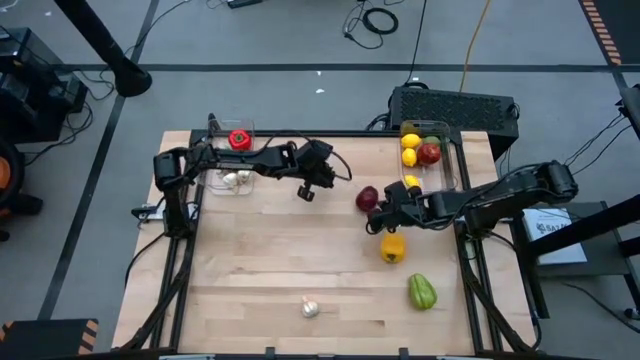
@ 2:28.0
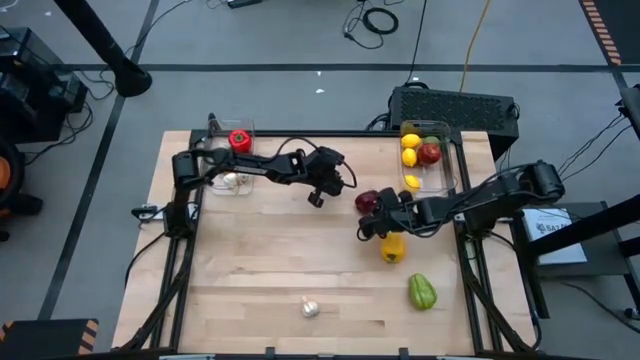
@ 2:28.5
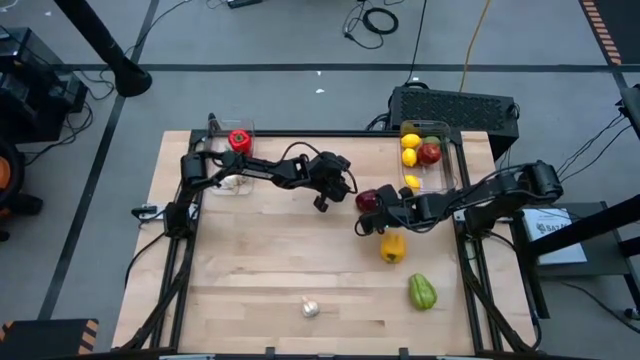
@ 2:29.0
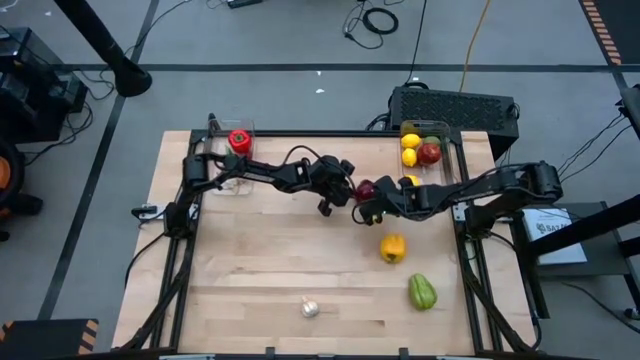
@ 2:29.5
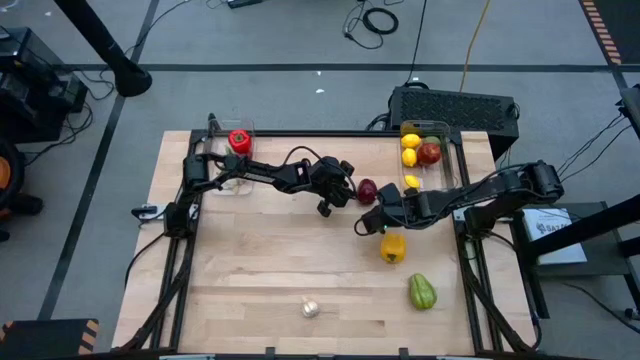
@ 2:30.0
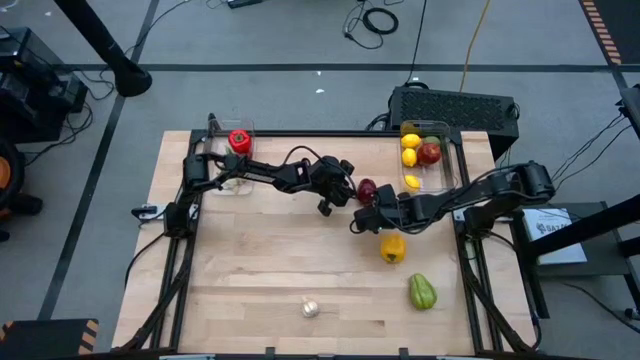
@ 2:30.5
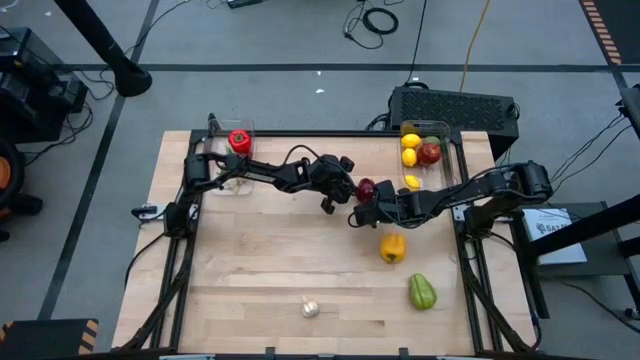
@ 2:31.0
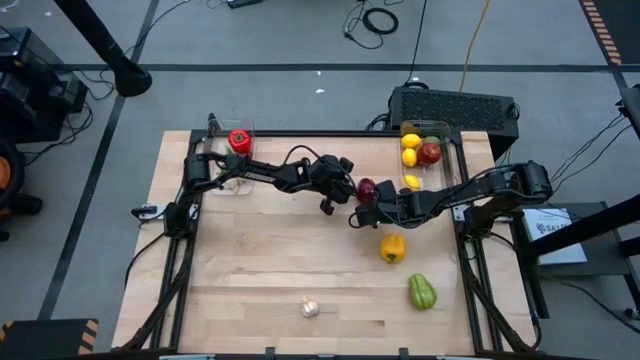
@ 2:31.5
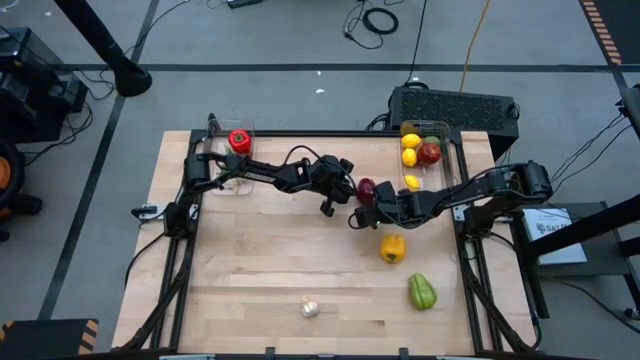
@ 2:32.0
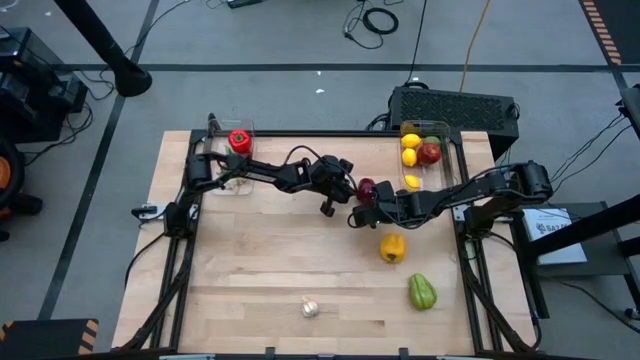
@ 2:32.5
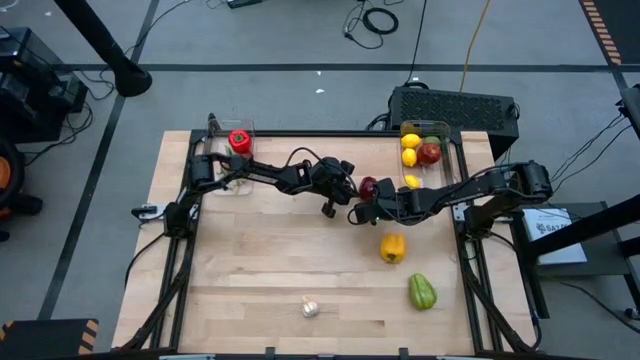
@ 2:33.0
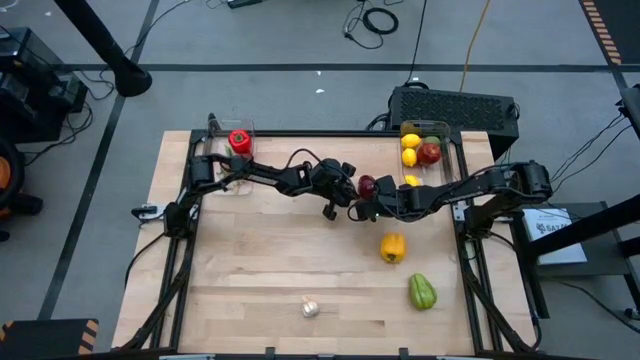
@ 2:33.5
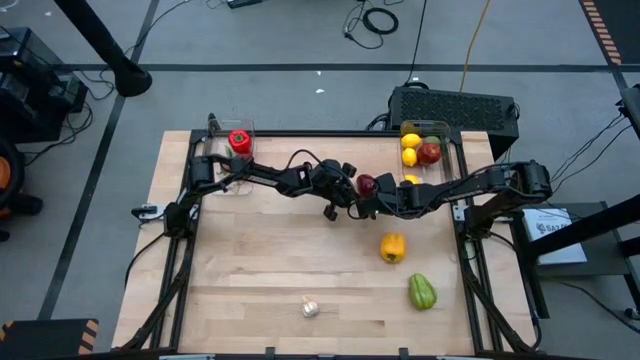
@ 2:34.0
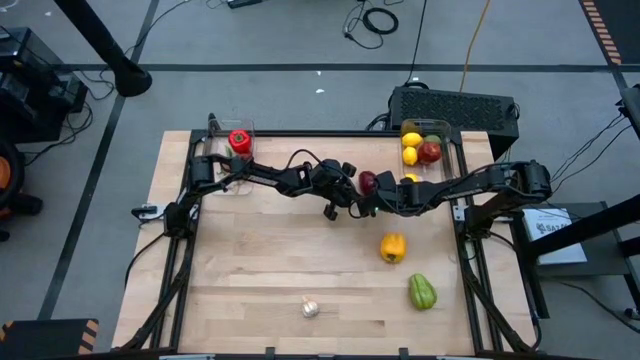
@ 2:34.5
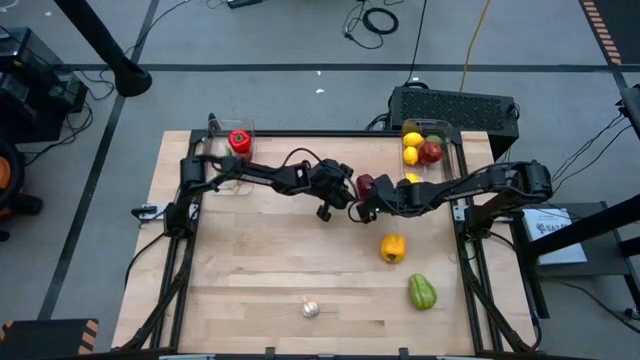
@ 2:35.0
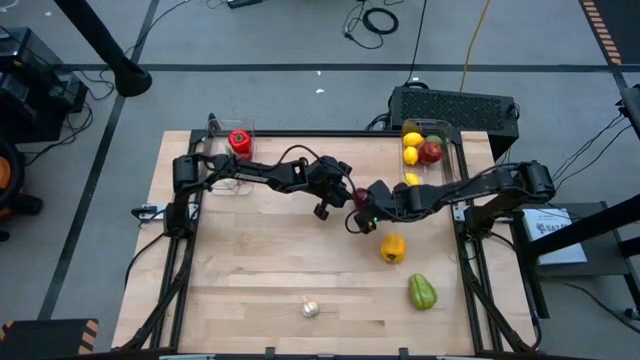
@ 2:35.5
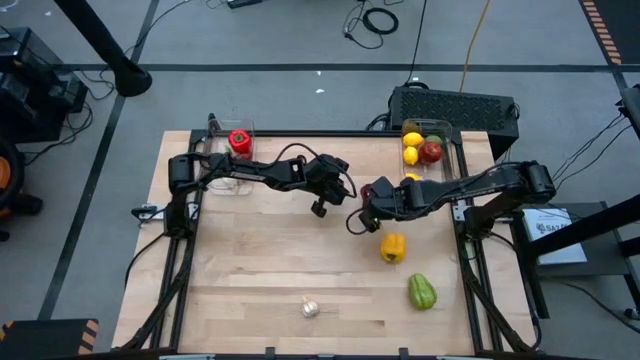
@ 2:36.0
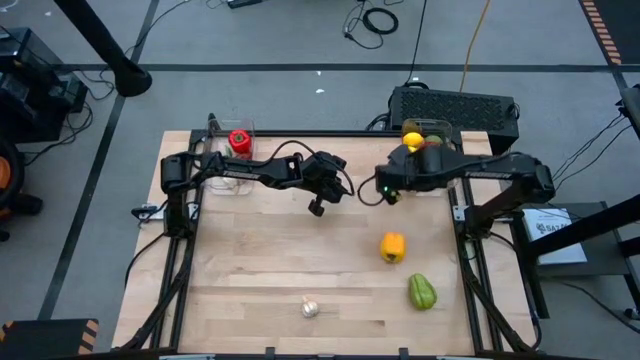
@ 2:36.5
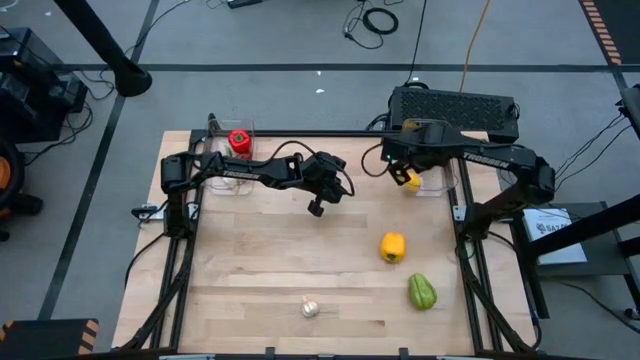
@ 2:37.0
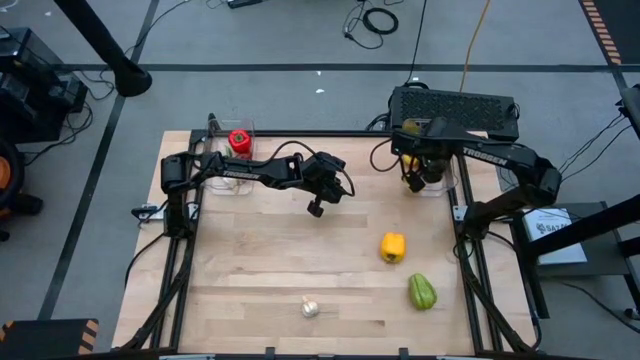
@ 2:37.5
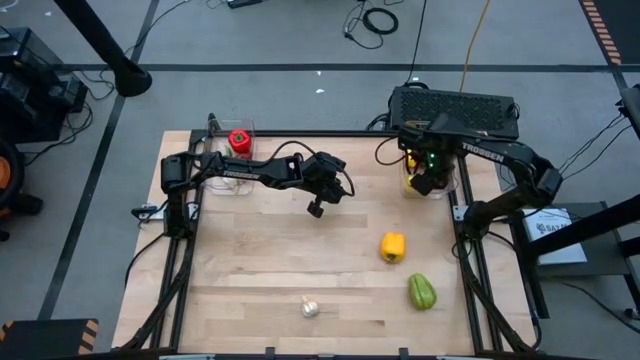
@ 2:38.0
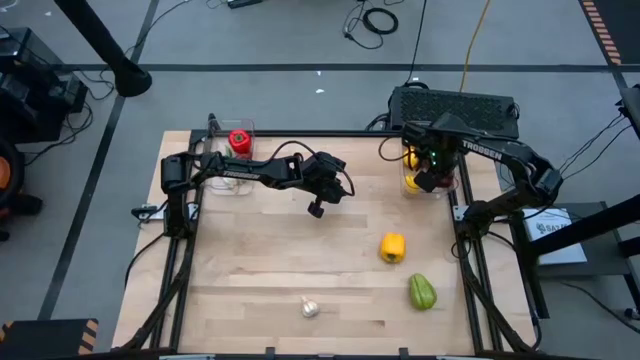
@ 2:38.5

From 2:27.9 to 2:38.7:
Task: Sort produce into baskets
Put the apple into the right transparent bin

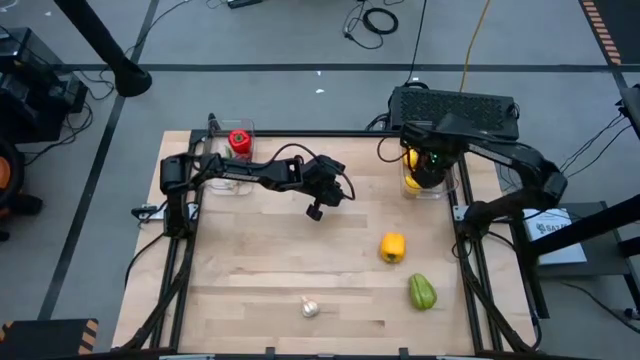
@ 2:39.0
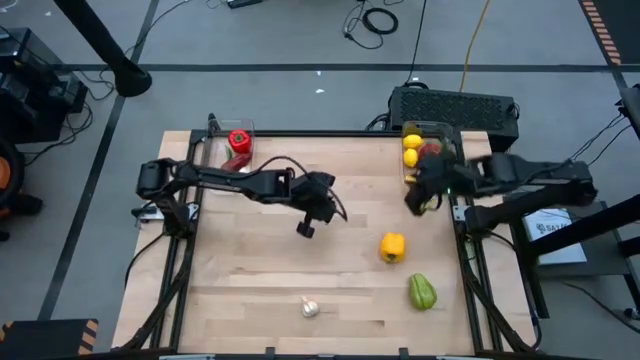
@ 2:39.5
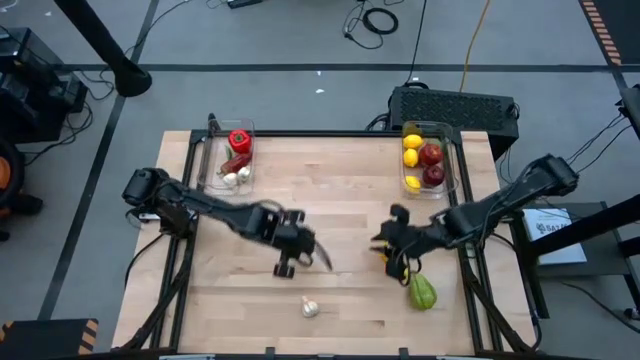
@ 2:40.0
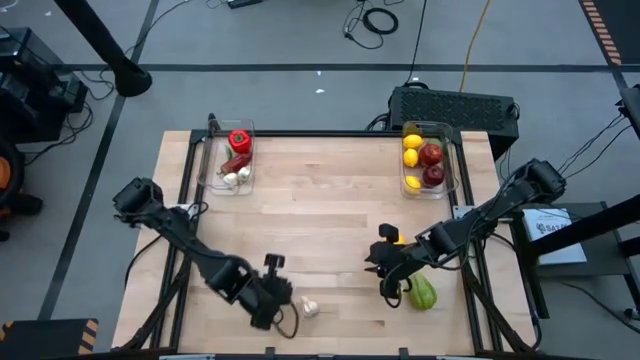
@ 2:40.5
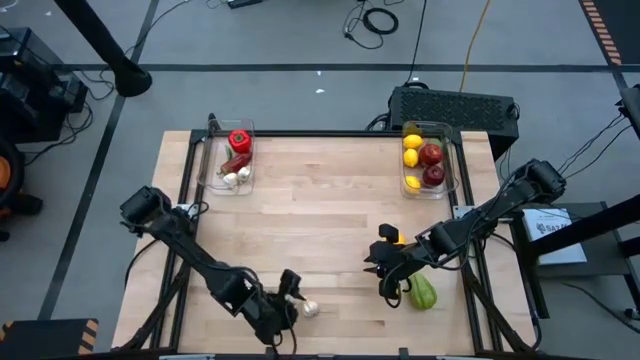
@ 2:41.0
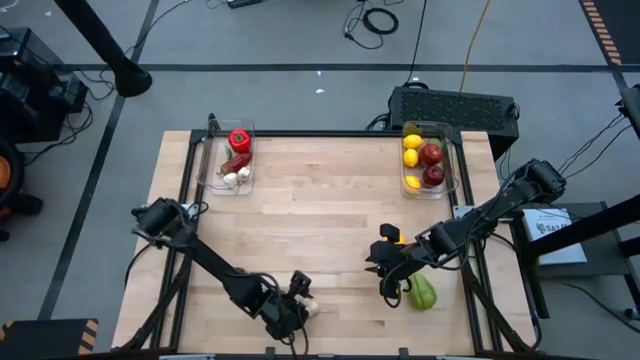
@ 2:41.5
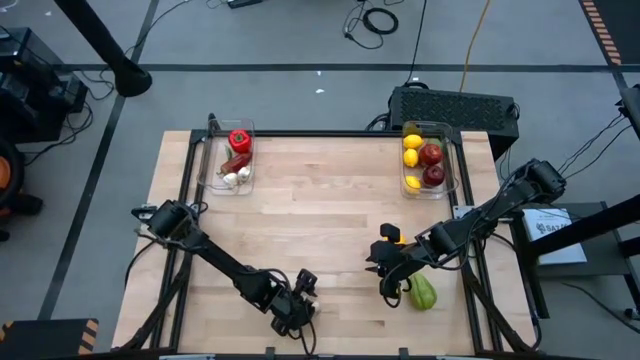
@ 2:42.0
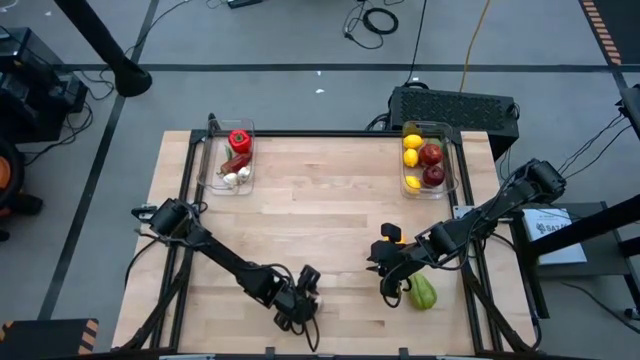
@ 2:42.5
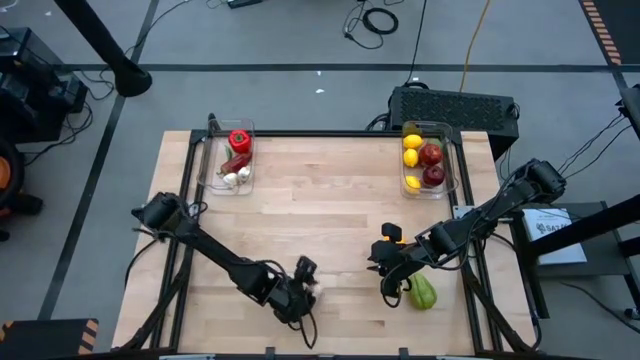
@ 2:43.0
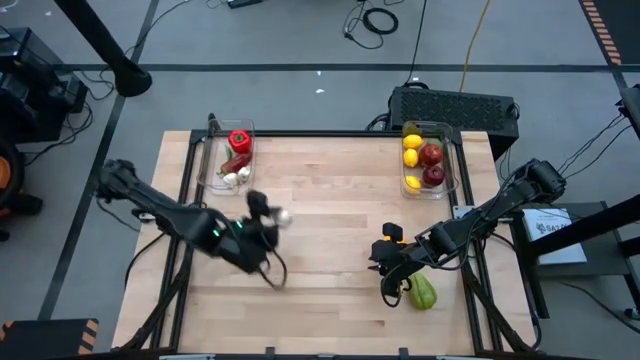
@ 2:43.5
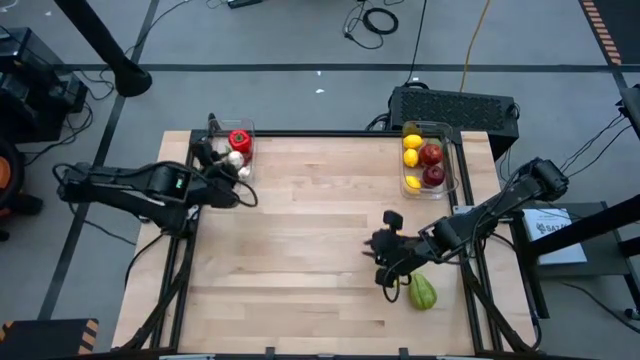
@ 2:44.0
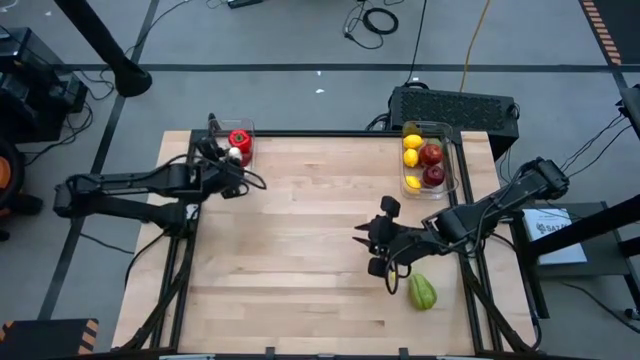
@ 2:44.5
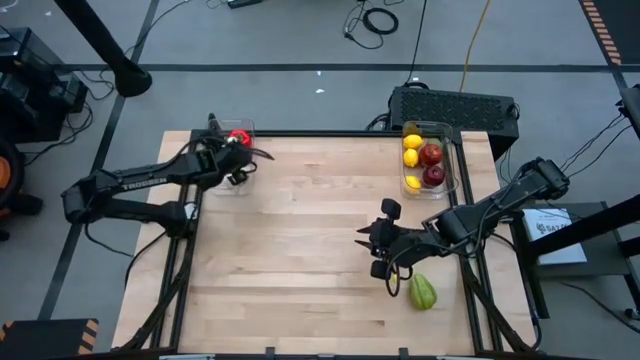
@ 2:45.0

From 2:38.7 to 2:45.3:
Put the white garlic into the left transparent bin

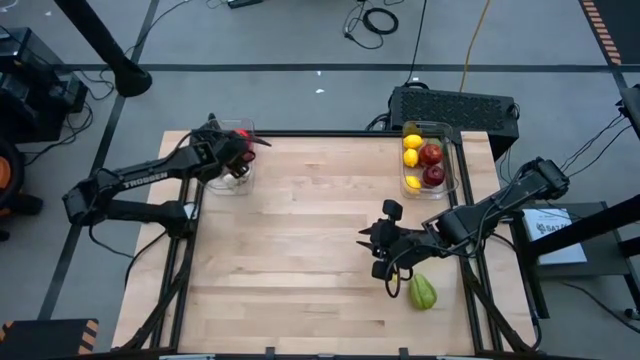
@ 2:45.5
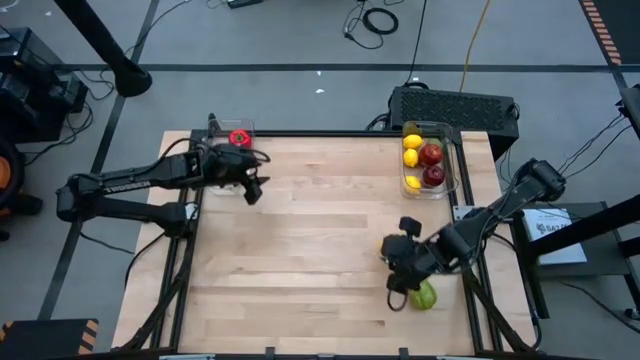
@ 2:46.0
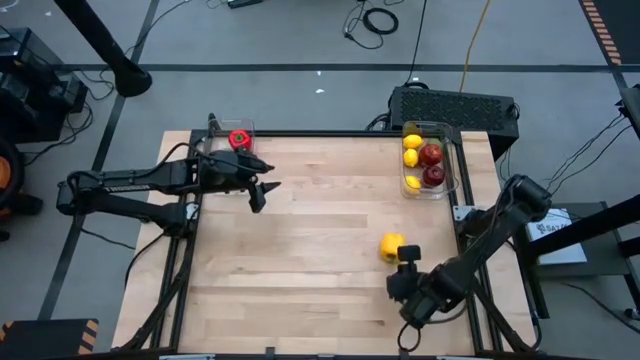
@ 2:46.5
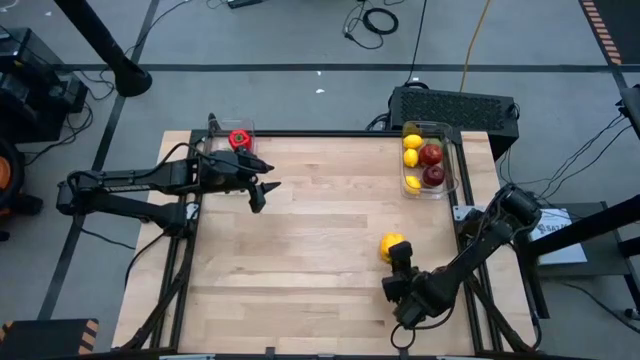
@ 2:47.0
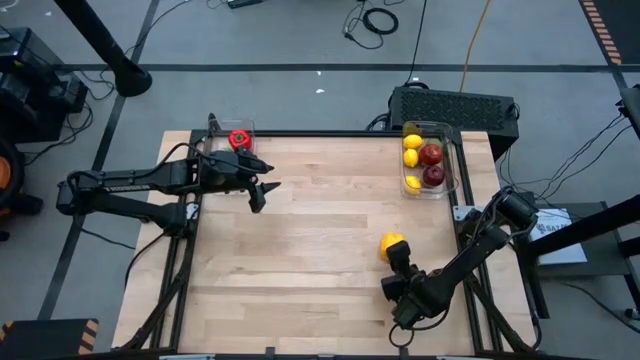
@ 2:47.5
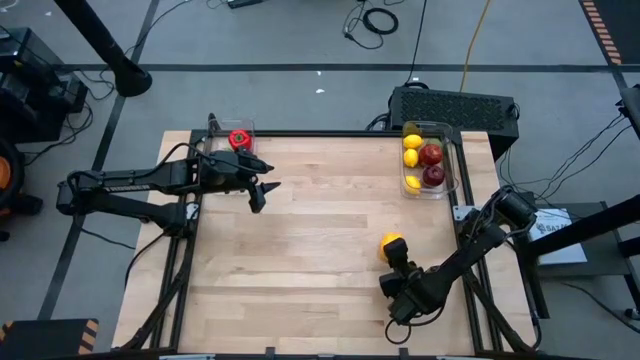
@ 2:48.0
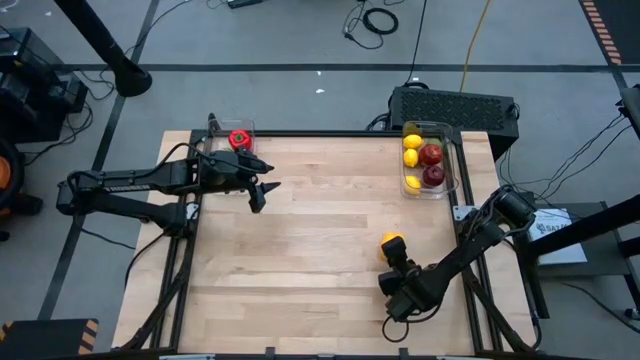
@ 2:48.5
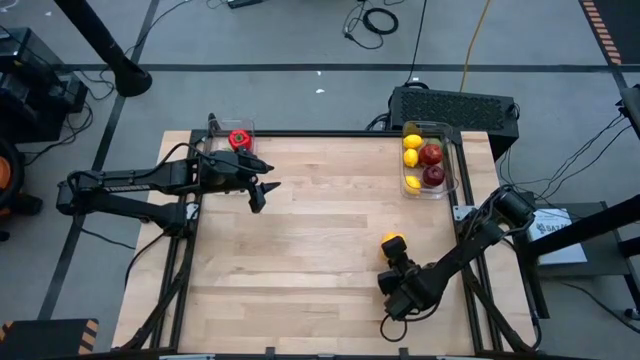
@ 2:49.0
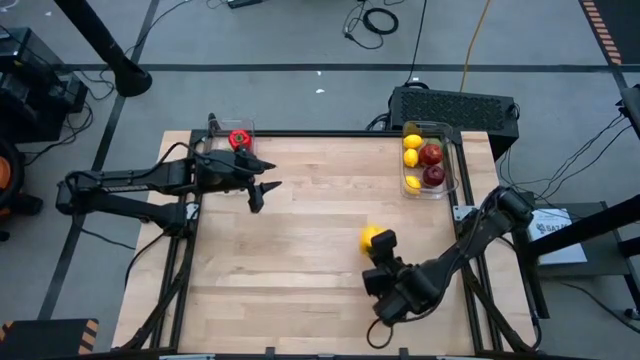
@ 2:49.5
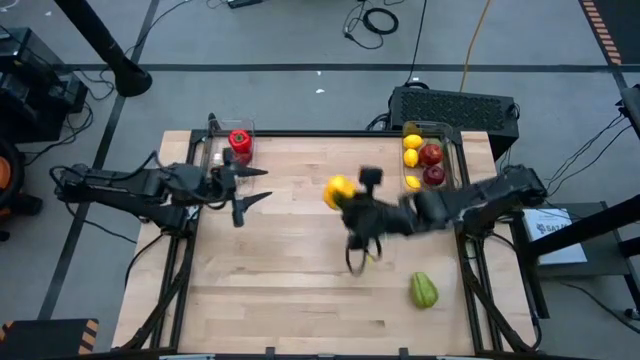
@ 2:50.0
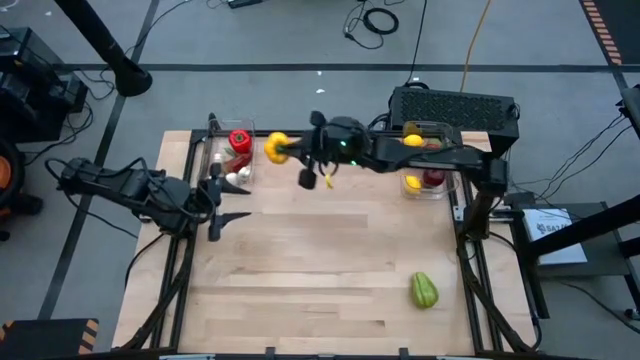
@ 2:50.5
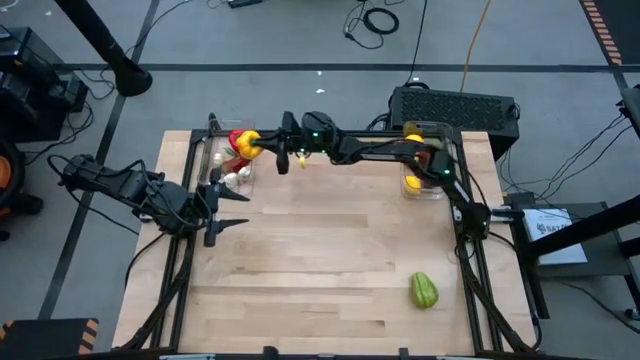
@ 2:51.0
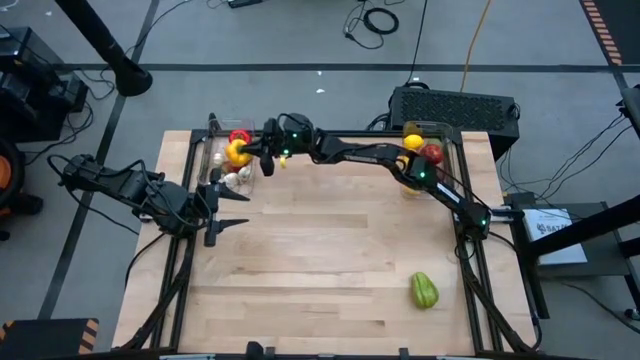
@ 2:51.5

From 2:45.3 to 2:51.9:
Put the yellow bell pepper into the left transparent bin
